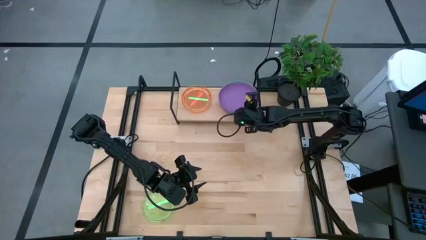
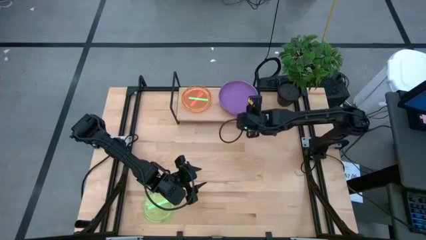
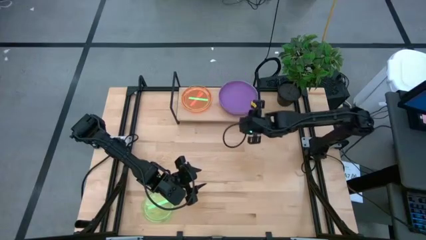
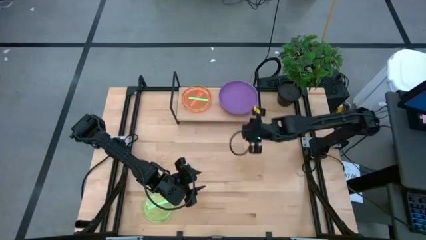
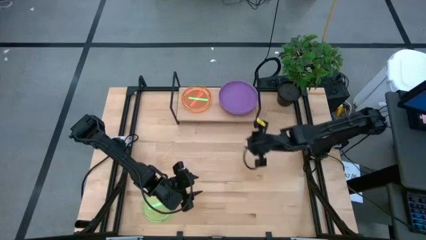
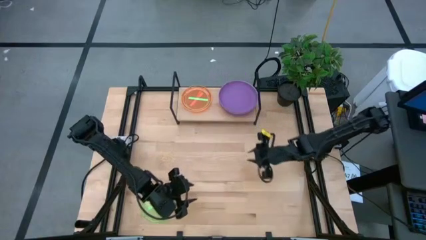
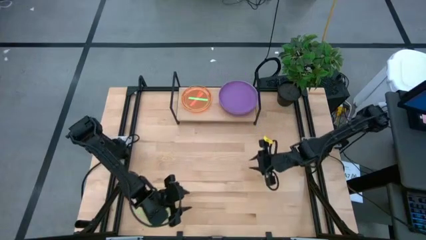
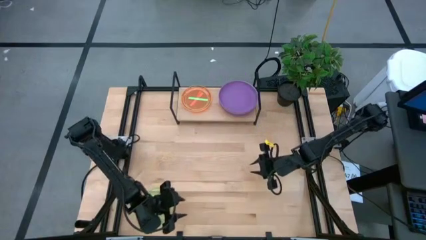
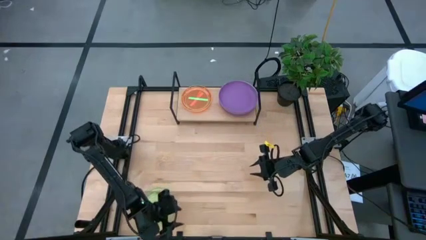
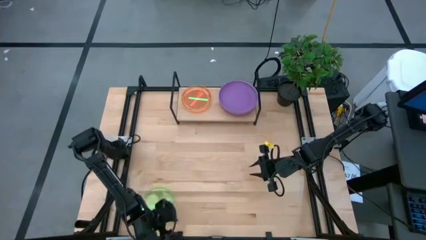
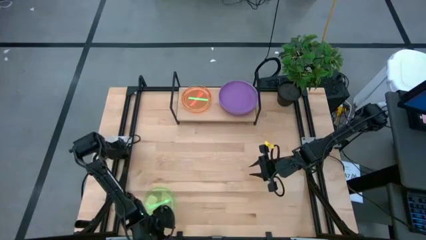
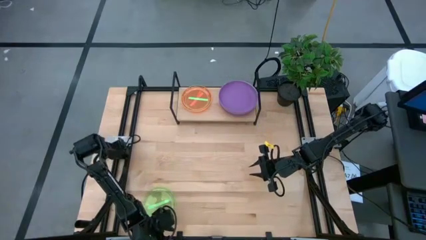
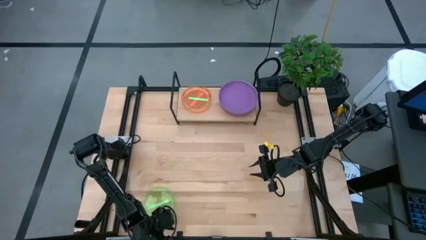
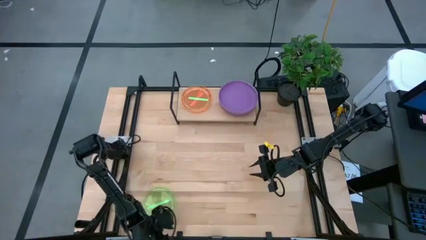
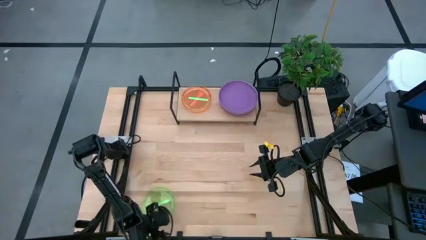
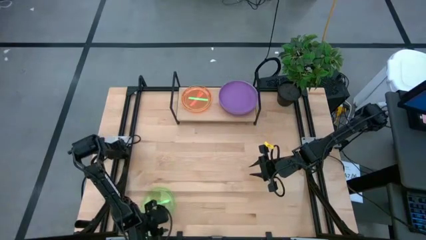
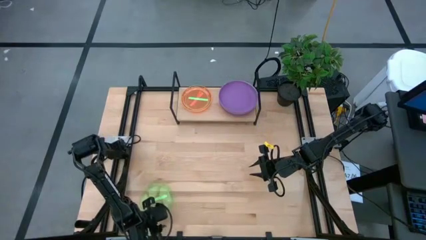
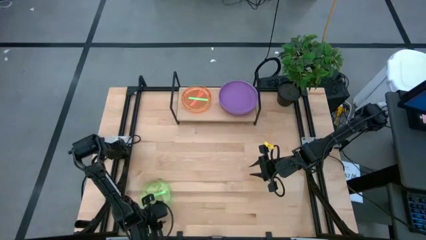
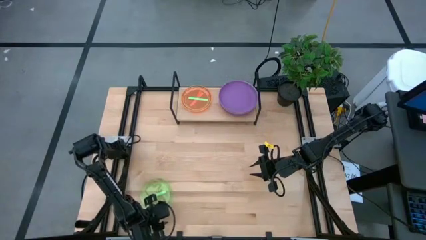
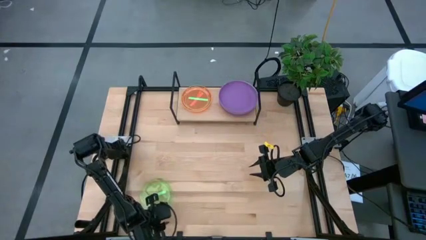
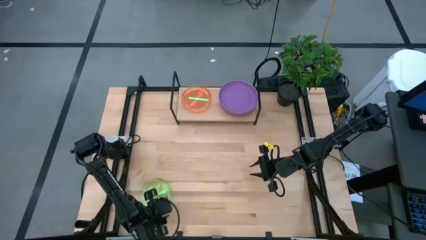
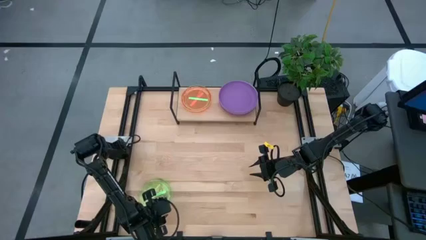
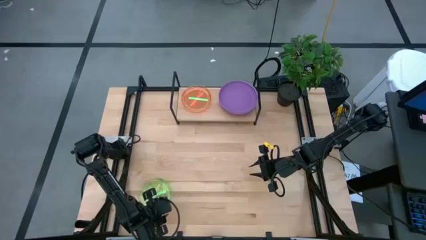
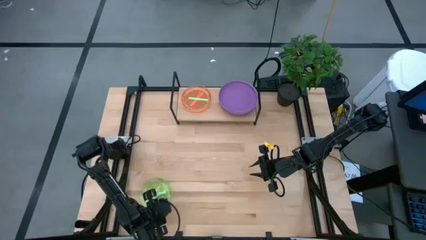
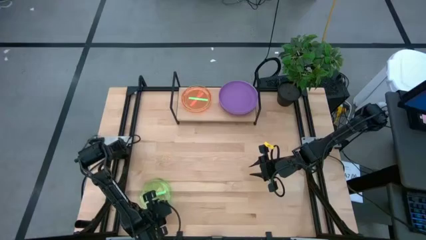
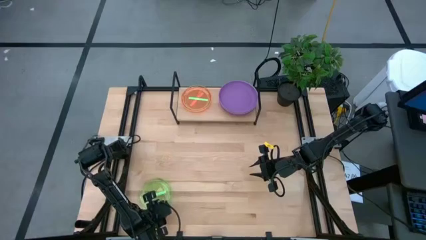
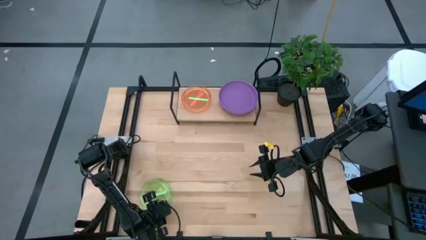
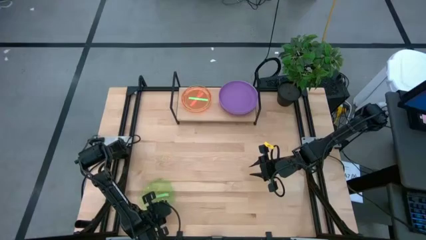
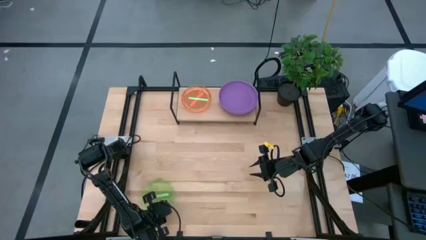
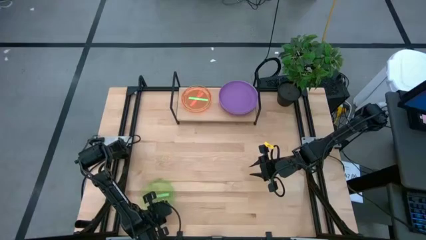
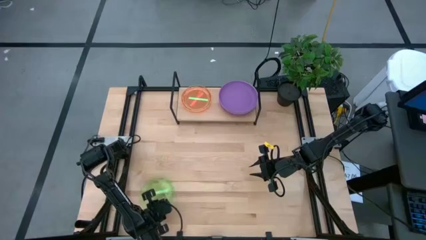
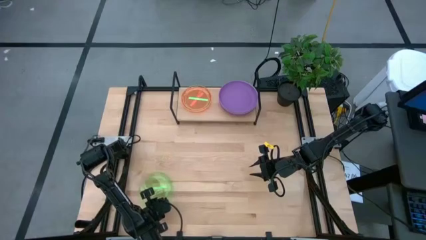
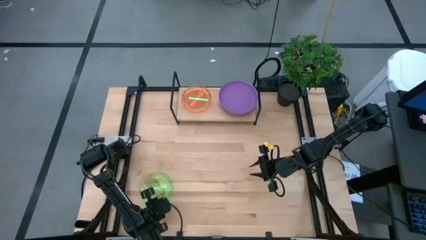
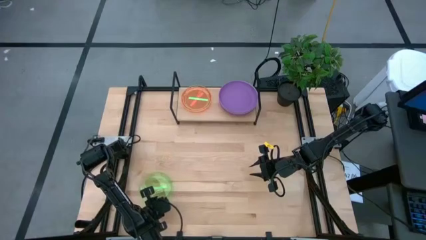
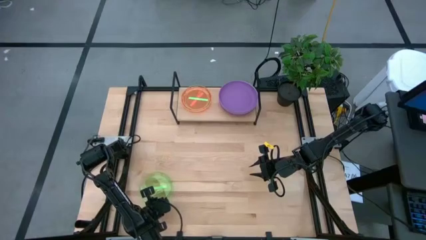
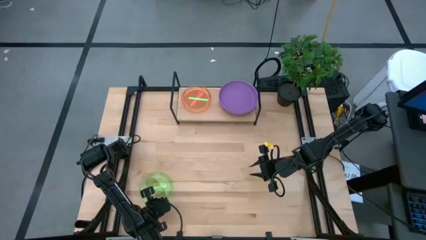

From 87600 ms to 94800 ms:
Task: Place and stack plates onto a shelf
Stack the small green plate on top of the green plate on the shelf

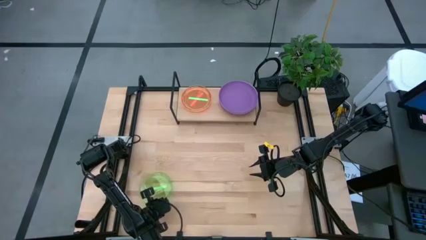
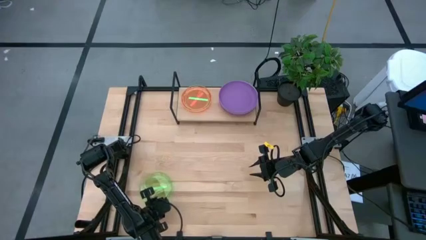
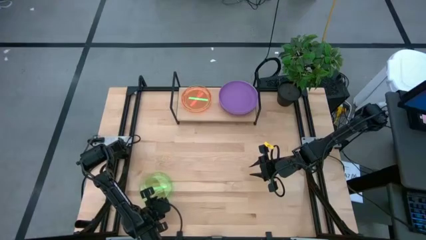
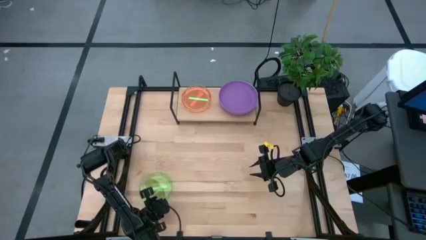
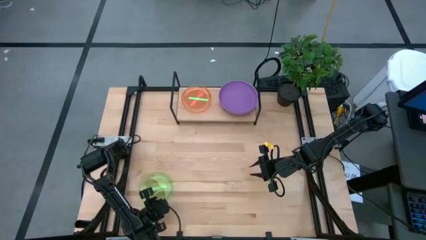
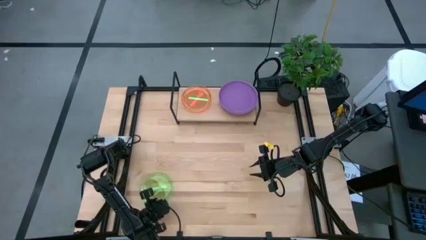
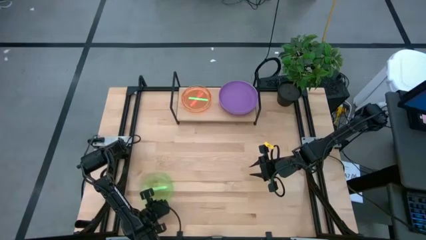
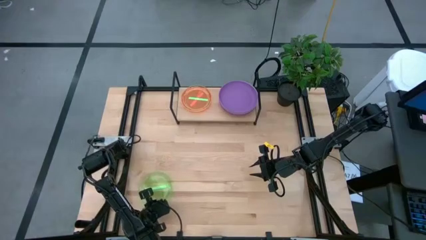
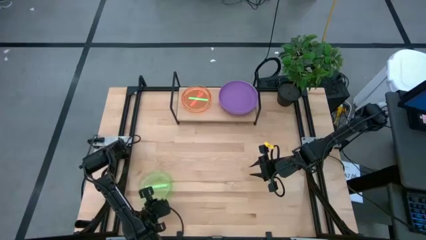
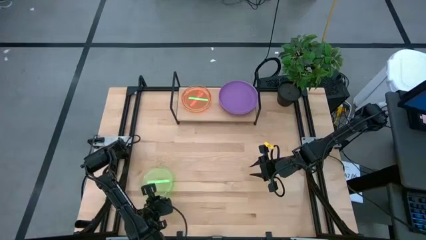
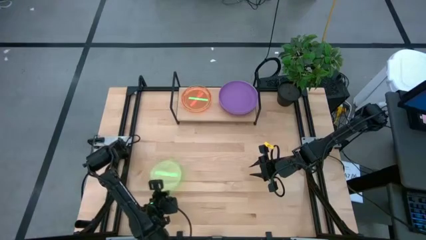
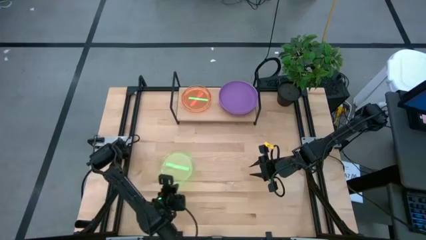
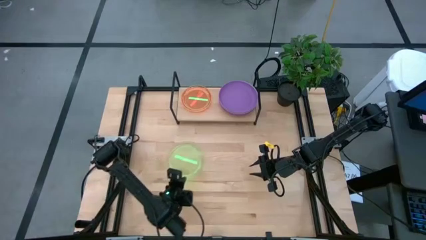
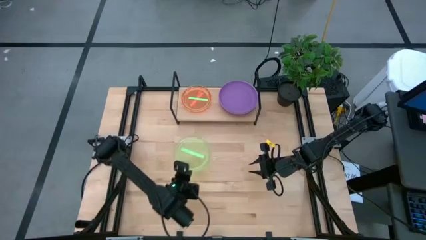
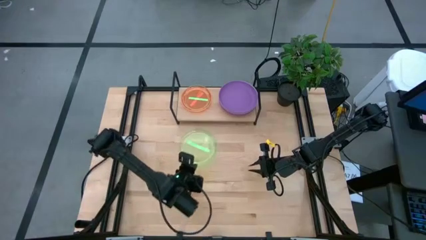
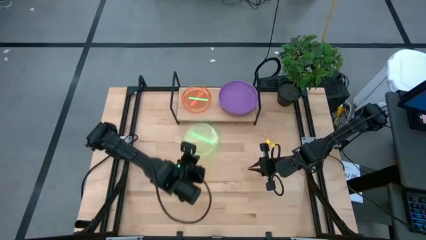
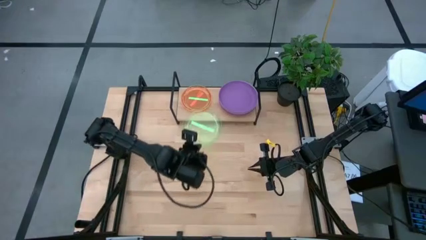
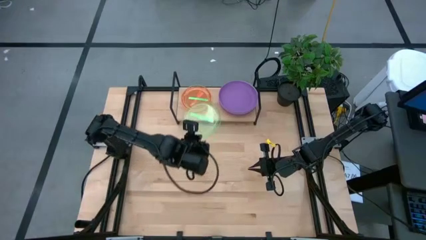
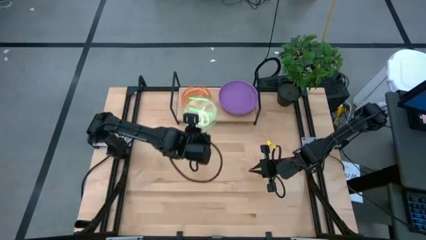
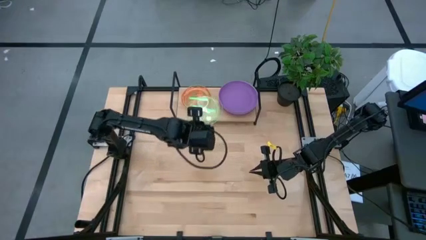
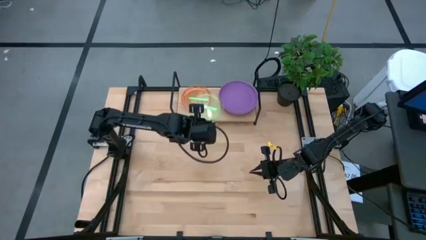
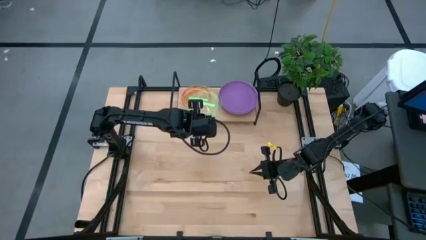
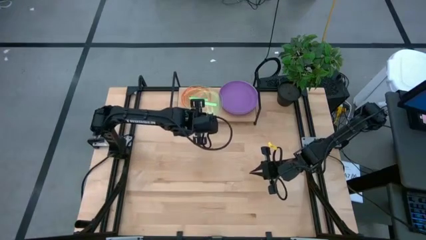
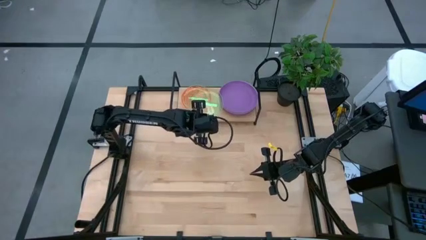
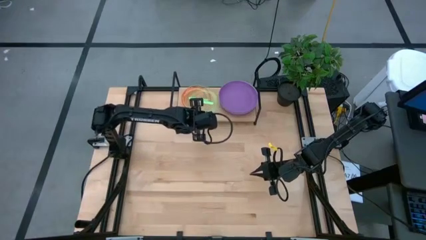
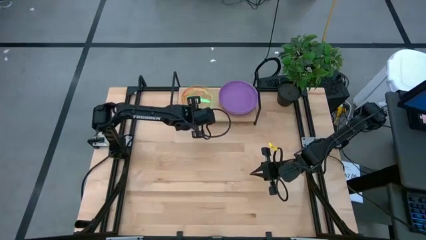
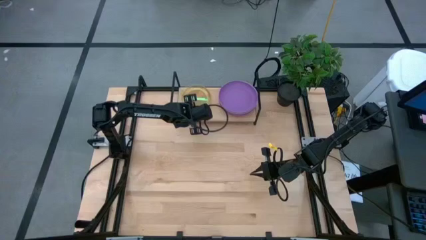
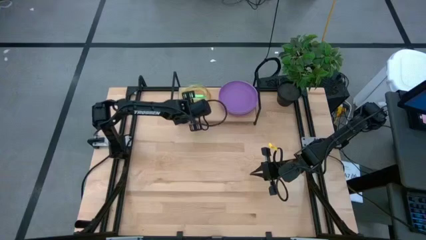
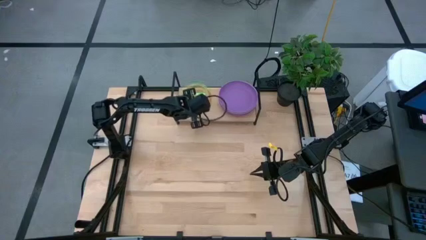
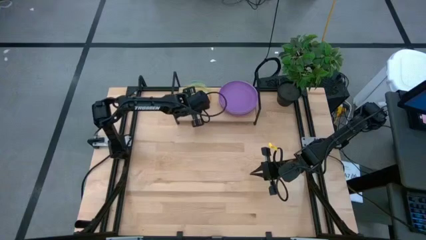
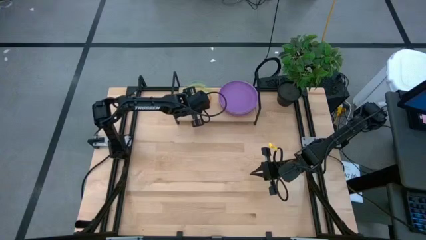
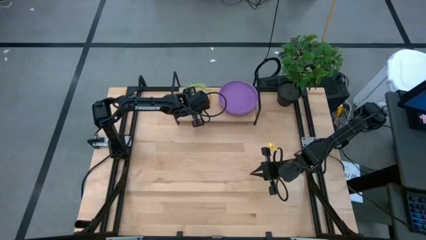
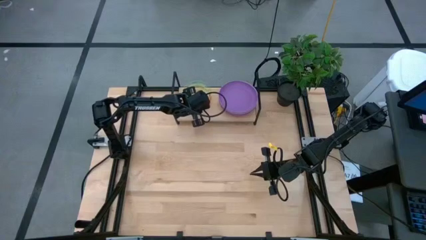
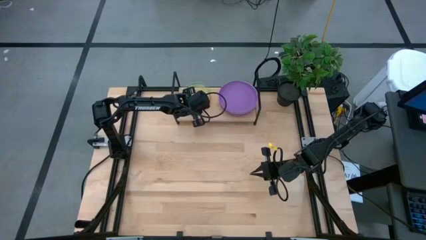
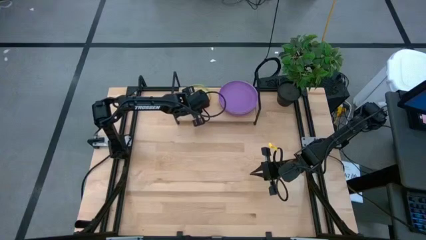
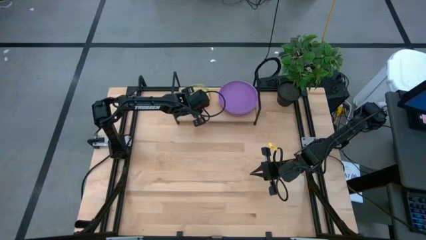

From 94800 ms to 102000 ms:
Stack the small green plate on top of the green plate on the shelf
